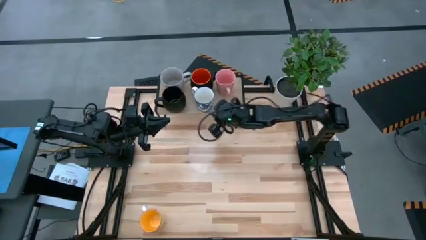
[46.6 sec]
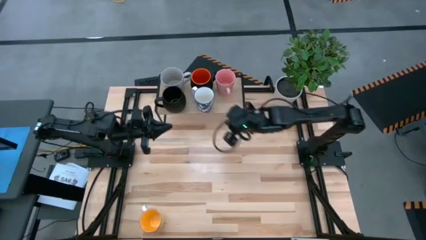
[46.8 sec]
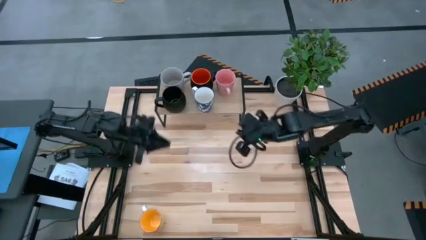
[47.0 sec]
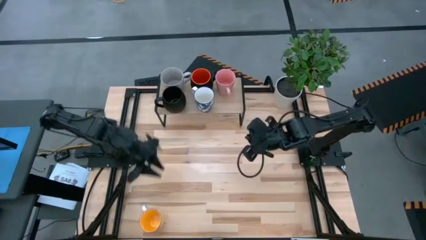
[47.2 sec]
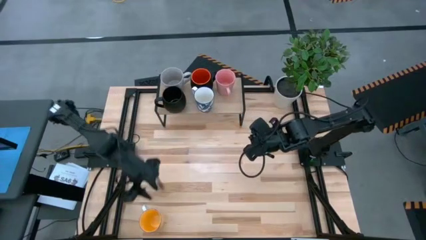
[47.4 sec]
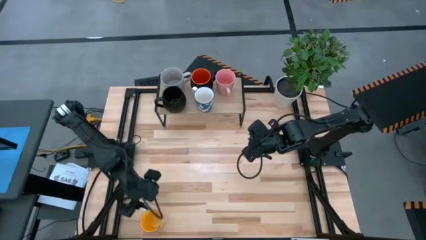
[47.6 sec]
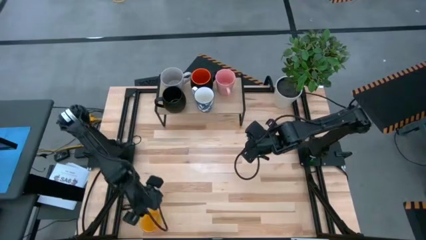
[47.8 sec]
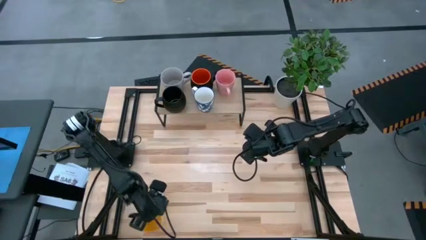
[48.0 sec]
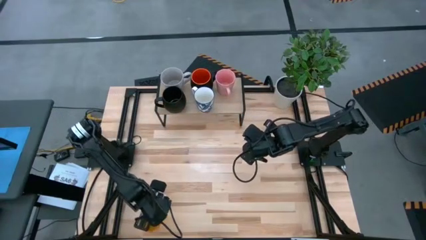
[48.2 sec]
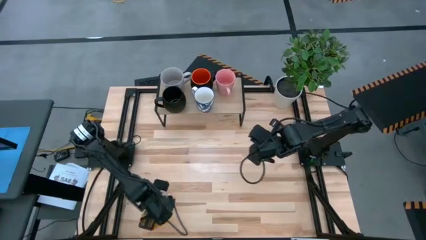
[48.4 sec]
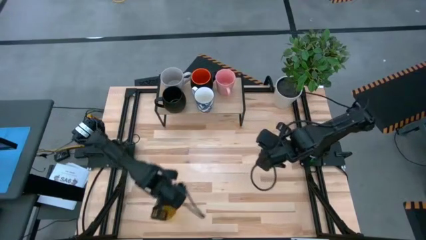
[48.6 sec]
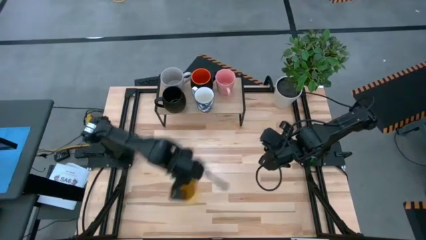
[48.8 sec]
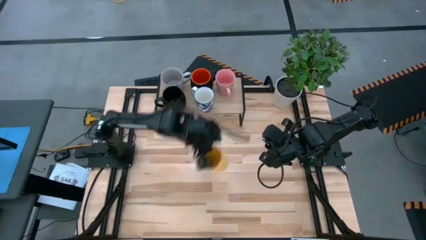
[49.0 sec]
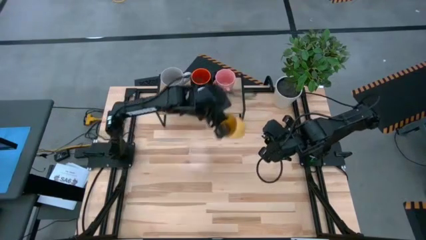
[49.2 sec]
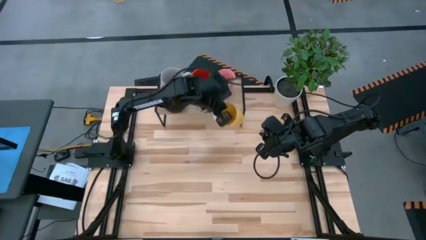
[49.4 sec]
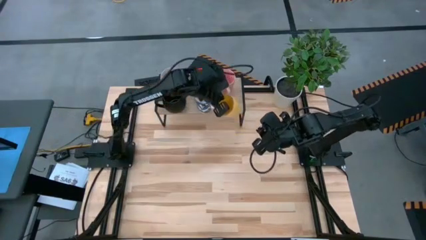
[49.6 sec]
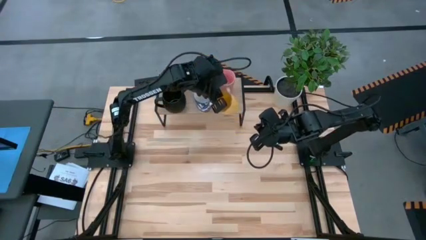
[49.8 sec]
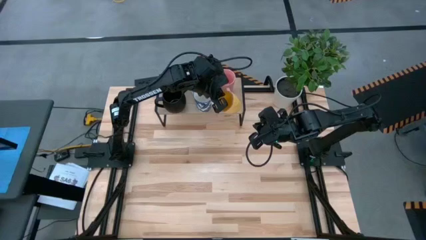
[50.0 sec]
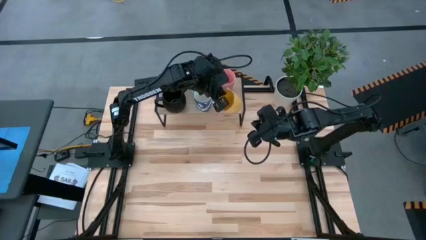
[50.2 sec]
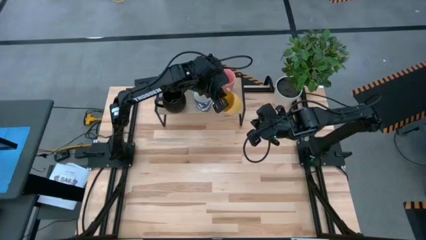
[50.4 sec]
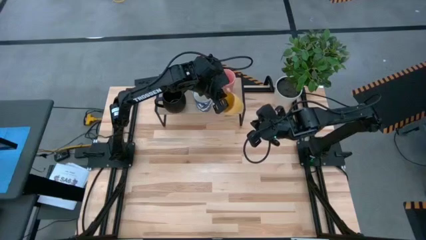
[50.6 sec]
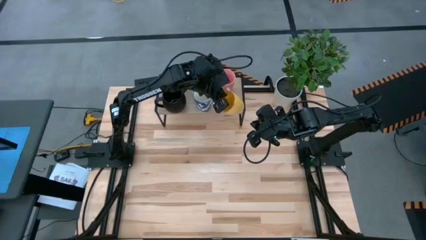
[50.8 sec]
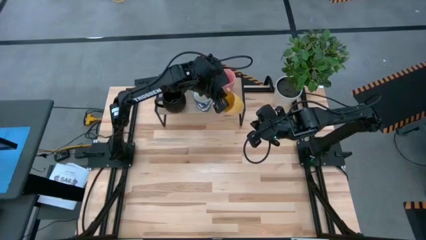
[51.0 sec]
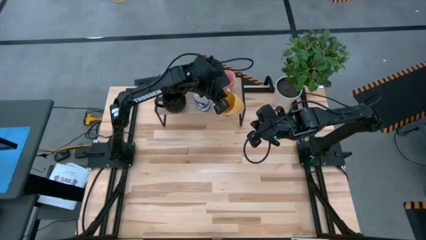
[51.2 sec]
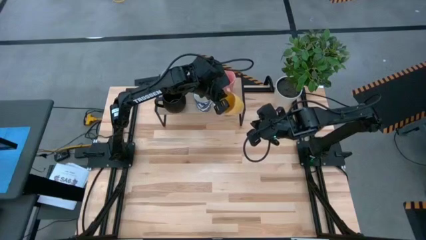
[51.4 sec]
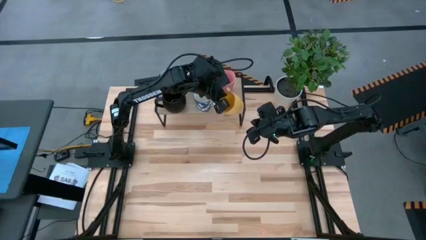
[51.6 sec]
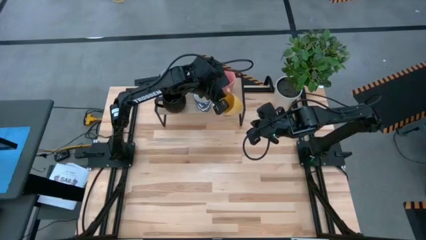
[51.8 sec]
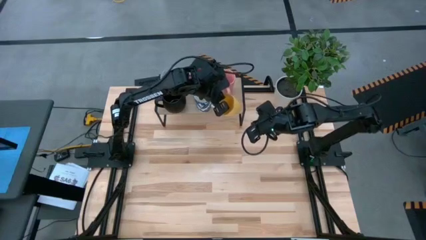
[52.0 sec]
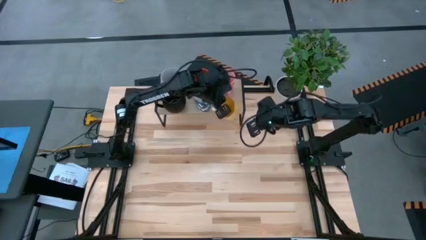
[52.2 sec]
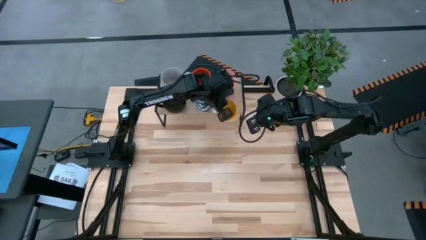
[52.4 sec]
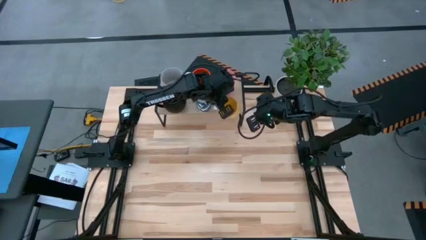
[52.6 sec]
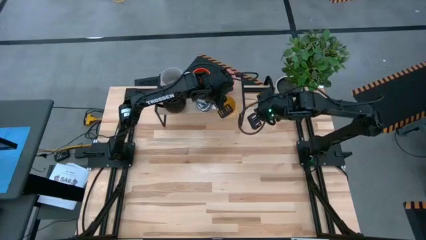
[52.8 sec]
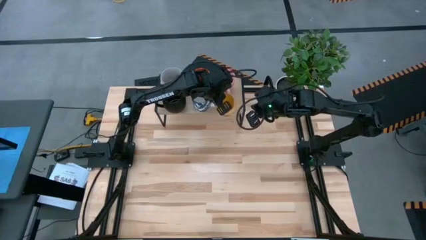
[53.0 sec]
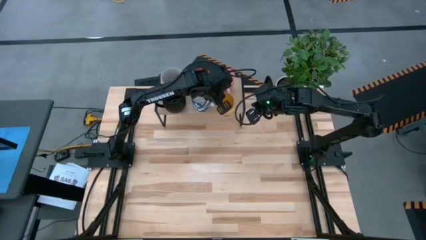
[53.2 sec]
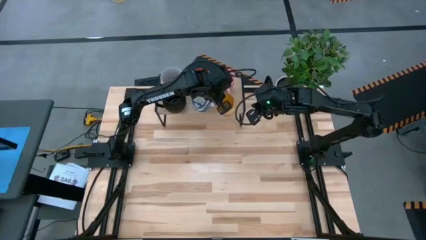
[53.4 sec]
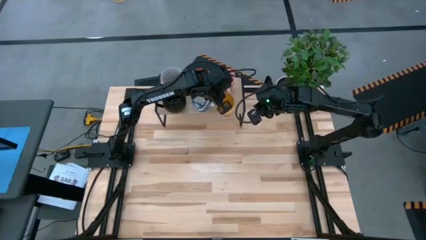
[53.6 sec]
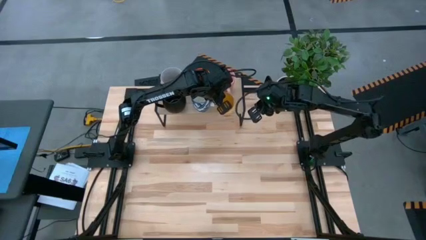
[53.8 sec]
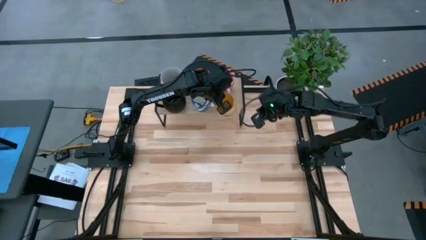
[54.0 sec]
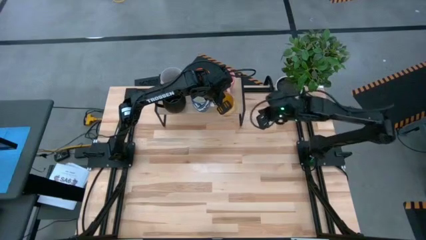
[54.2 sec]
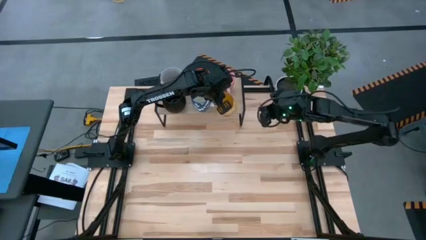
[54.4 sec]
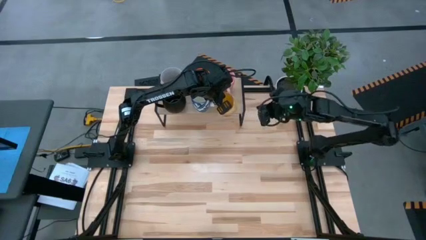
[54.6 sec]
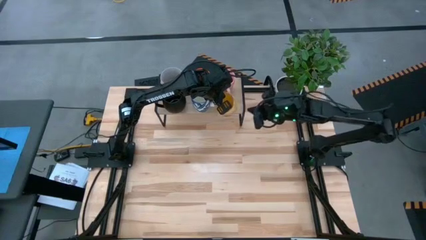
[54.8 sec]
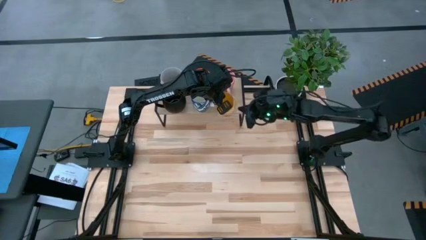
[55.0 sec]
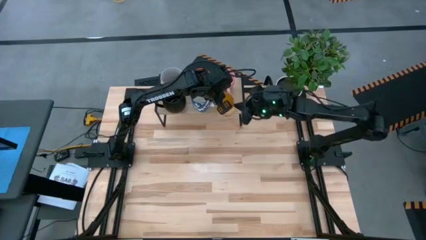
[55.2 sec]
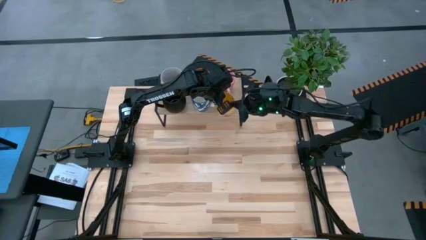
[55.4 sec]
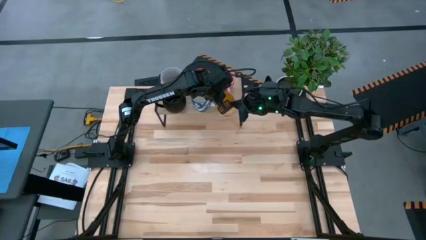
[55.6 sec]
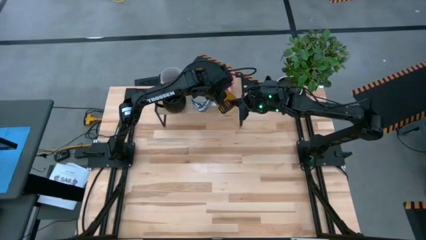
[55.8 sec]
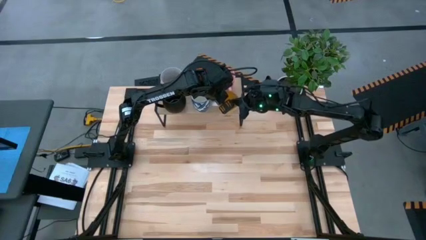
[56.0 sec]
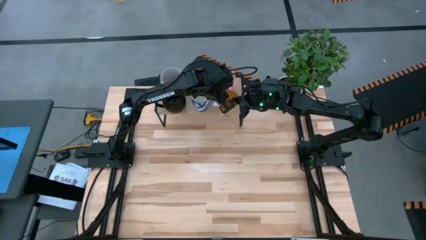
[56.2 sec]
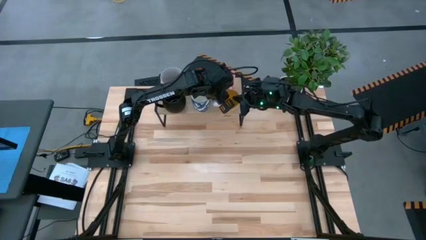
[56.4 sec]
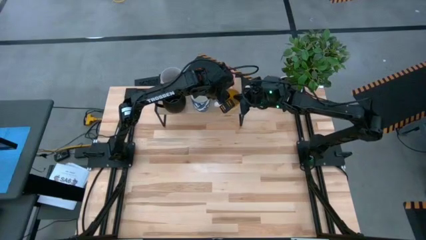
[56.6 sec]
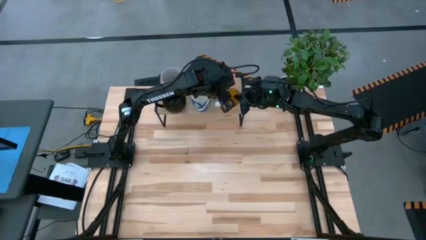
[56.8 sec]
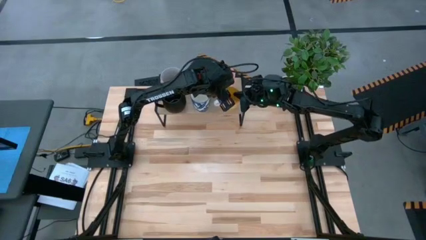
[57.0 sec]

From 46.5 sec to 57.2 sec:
Task: Place coffee mugs
Put the yellow cup on the shelf

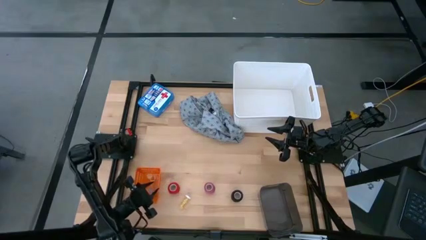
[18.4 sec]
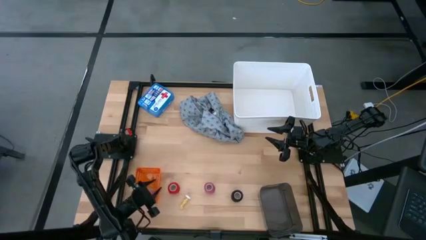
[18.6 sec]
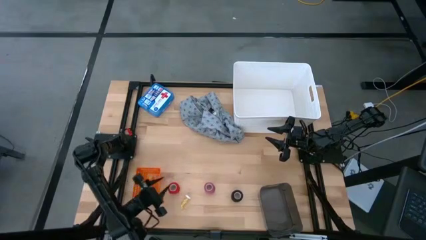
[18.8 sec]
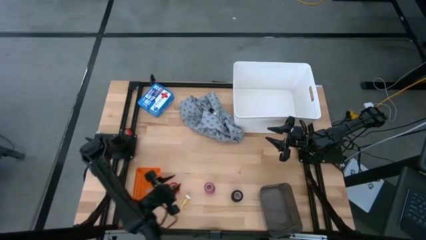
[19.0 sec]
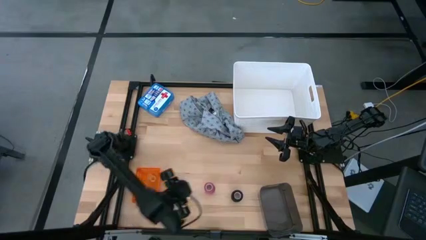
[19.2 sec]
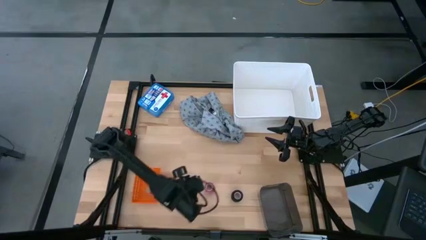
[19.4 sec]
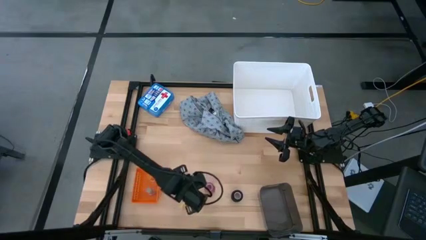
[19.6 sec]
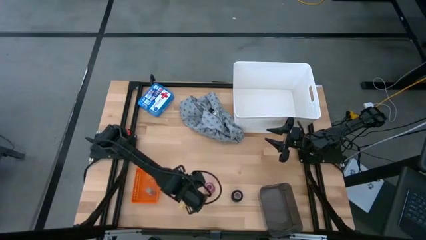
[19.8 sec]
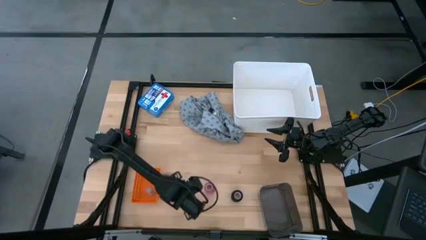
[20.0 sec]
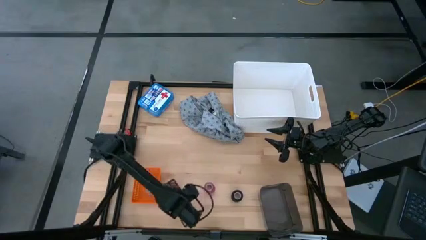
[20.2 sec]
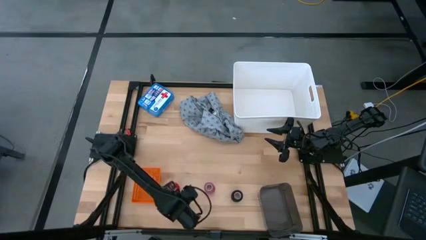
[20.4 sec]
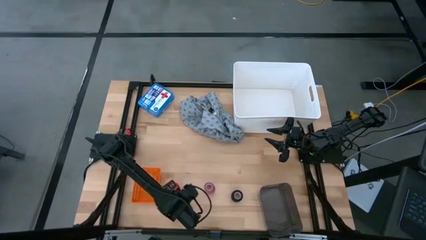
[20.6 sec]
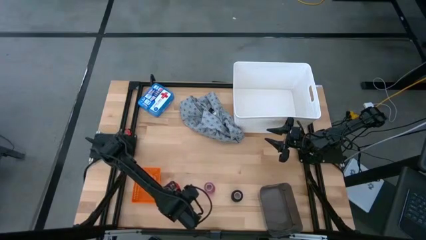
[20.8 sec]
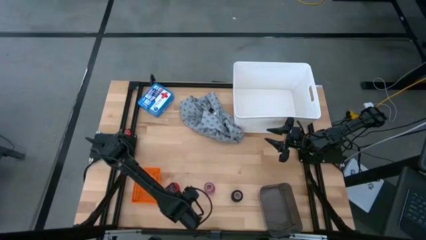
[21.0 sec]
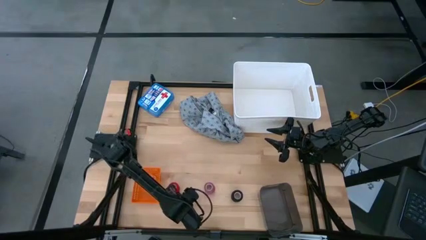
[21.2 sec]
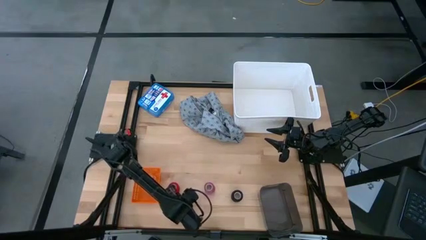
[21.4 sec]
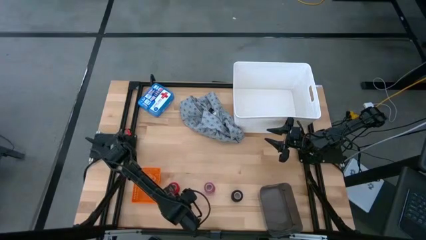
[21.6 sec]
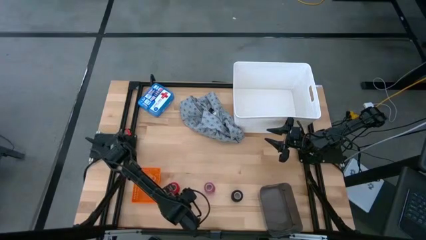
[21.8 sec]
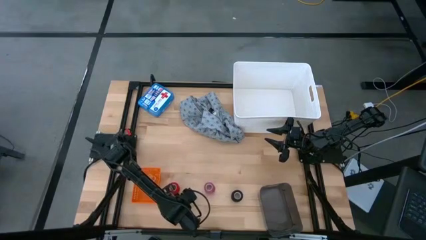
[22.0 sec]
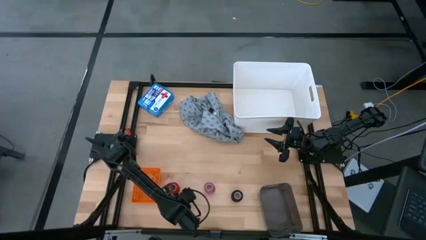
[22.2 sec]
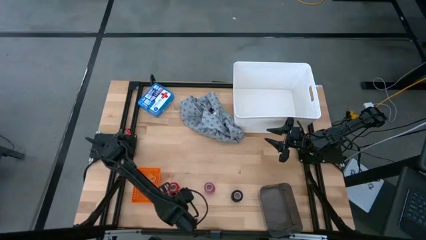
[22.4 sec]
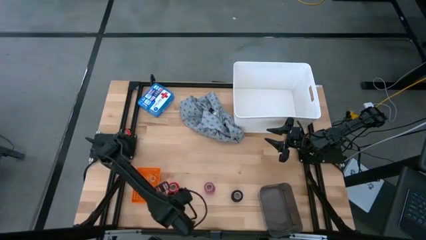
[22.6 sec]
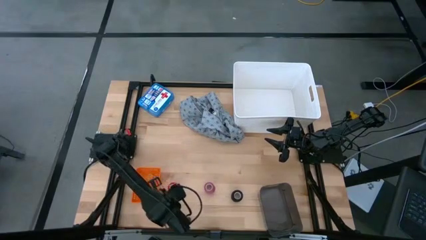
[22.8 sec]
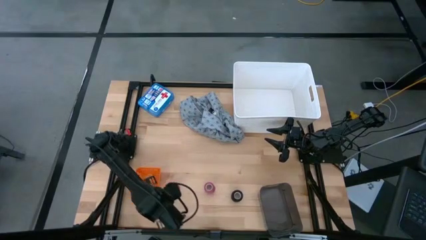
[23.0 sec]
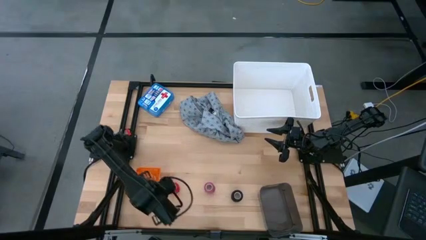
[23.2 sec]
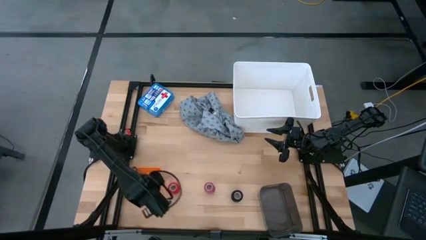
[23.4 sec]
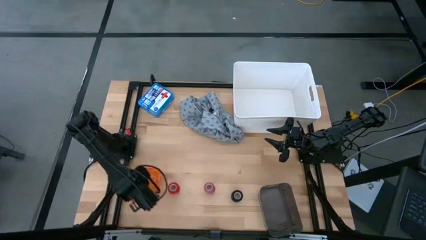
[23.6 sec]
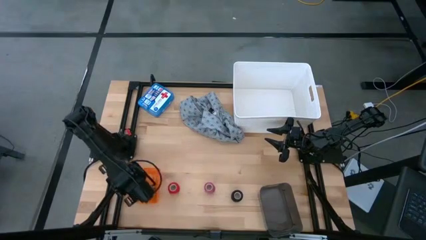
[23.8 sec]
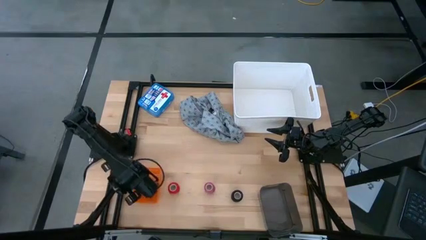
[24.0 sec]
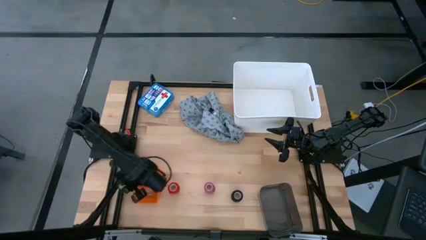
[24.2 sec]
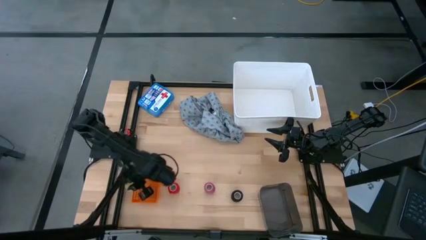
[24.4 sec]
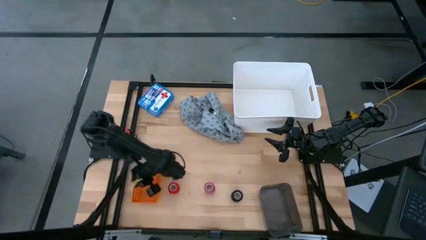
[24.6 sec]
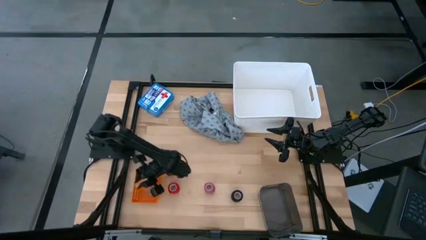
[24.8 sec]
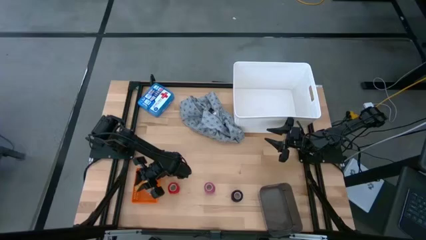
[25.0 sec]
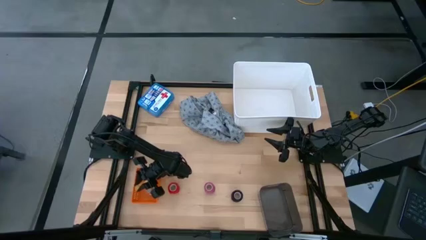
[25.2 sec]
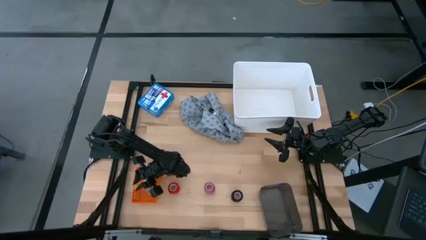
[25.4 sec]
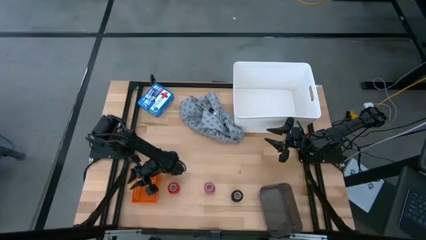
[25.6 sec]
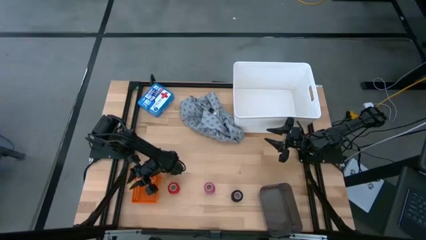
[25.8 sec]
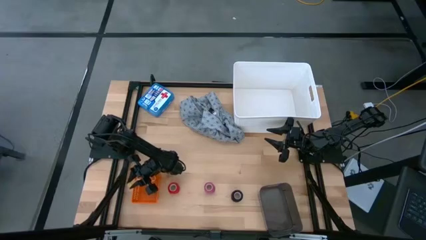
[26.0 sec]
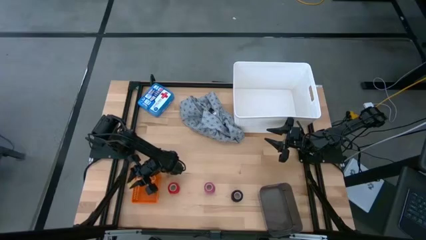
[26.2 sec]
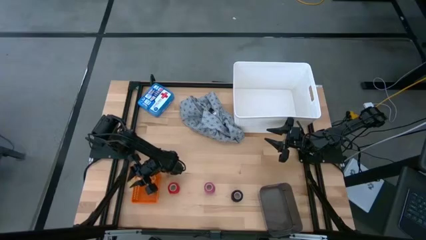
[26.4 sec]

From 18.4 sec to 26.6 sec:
Task: Pick & place medical supplies in basket/bin
Put the yellow pill bottle into the orange bin
